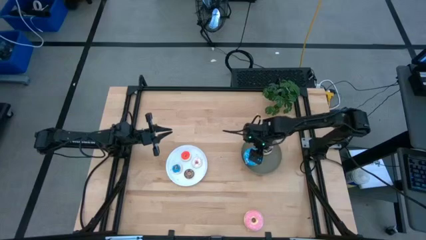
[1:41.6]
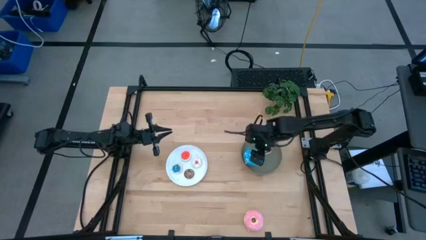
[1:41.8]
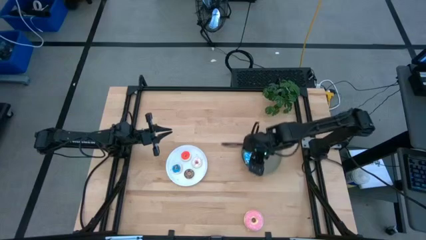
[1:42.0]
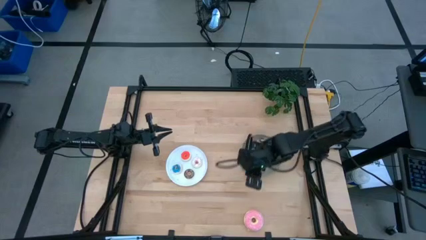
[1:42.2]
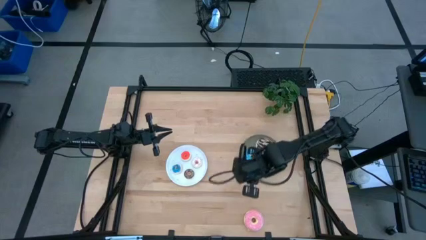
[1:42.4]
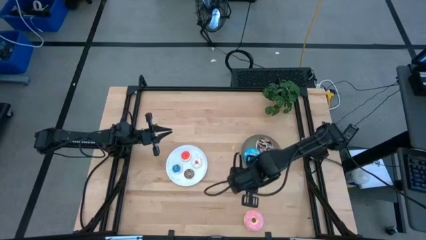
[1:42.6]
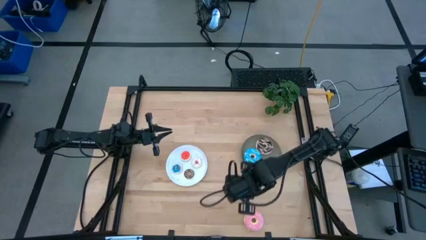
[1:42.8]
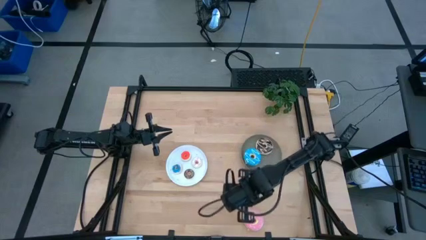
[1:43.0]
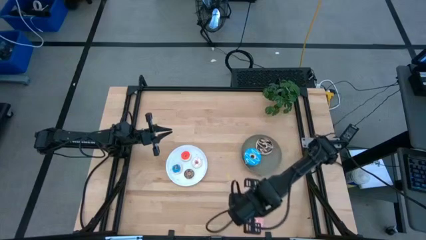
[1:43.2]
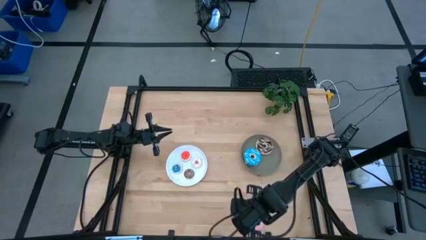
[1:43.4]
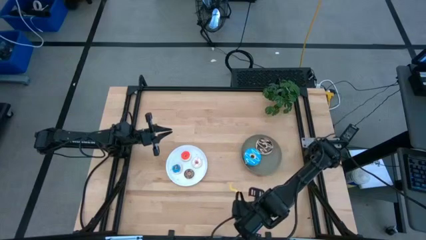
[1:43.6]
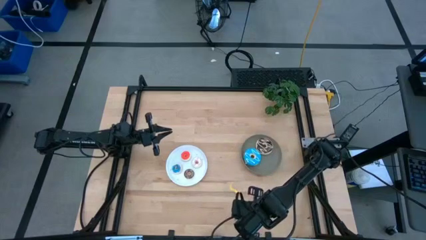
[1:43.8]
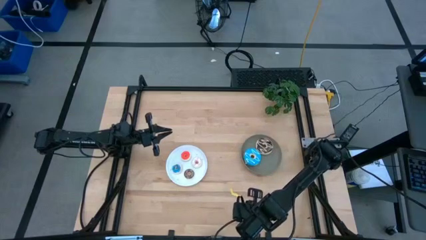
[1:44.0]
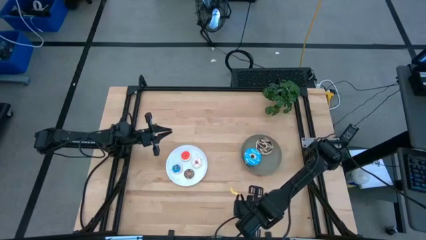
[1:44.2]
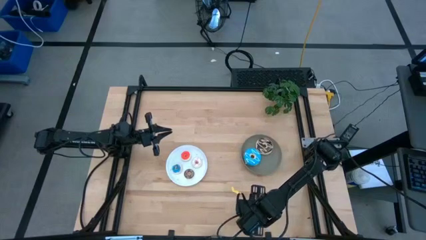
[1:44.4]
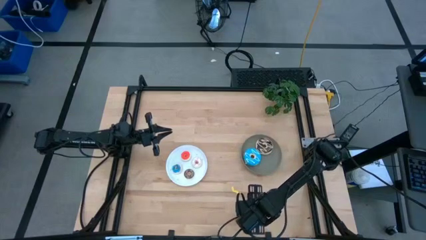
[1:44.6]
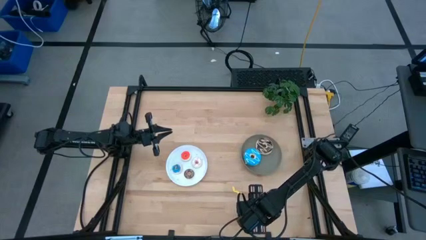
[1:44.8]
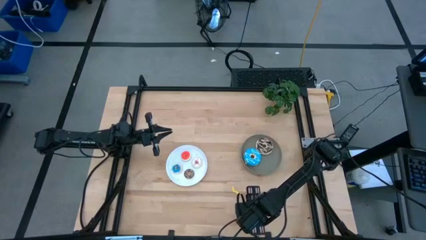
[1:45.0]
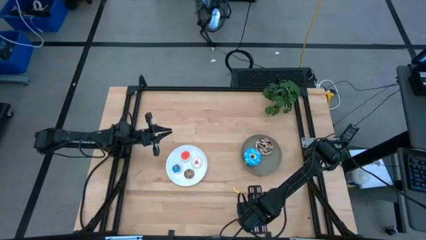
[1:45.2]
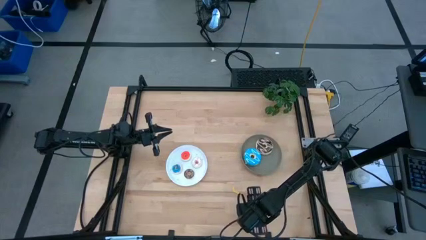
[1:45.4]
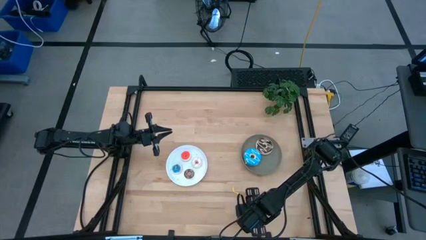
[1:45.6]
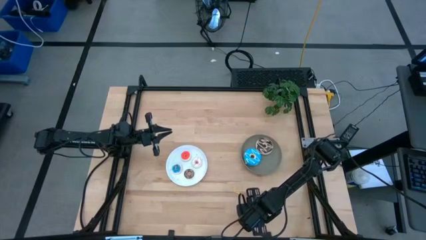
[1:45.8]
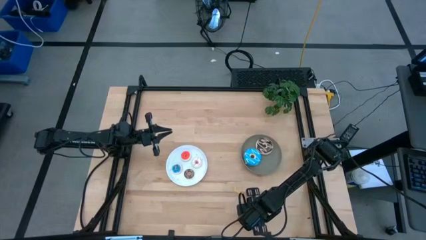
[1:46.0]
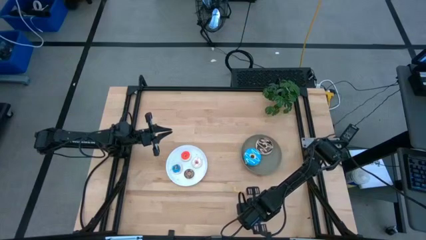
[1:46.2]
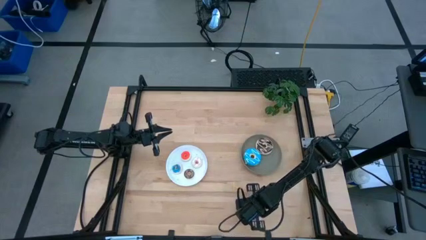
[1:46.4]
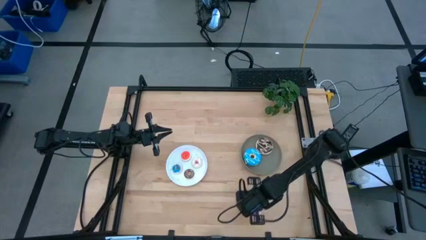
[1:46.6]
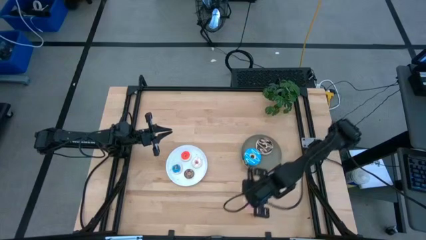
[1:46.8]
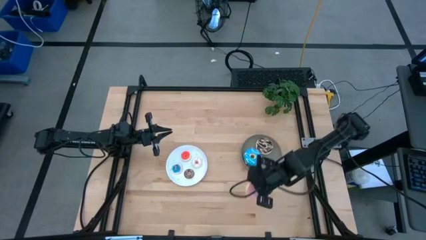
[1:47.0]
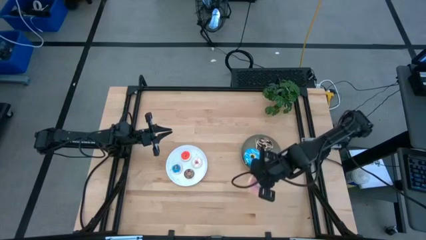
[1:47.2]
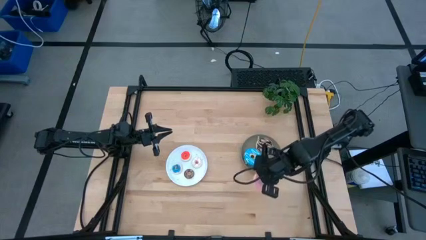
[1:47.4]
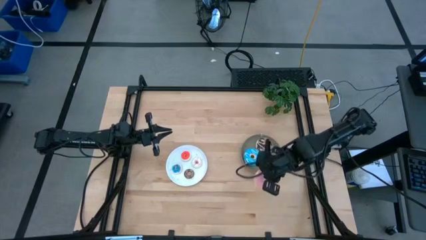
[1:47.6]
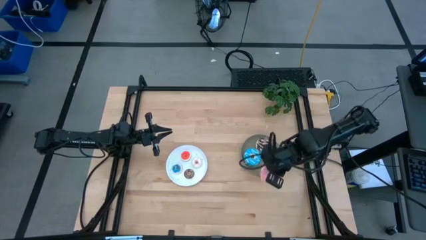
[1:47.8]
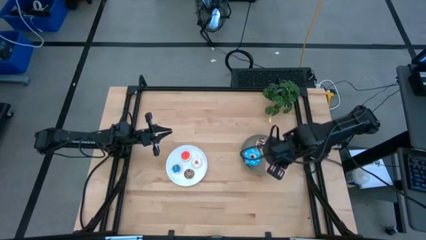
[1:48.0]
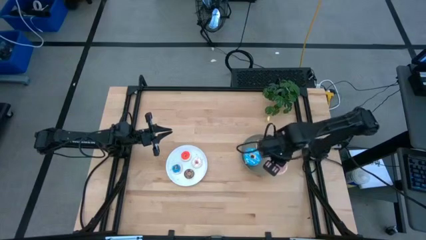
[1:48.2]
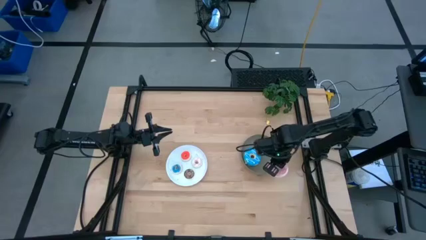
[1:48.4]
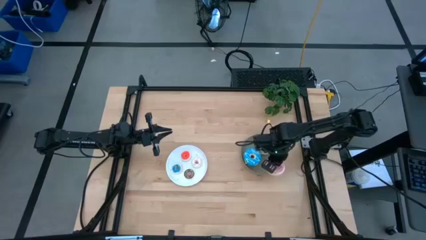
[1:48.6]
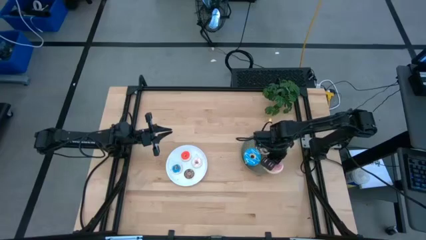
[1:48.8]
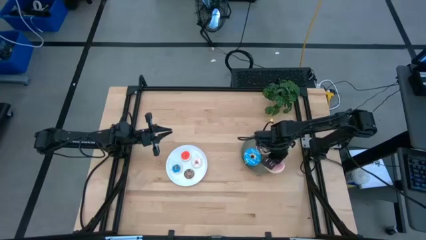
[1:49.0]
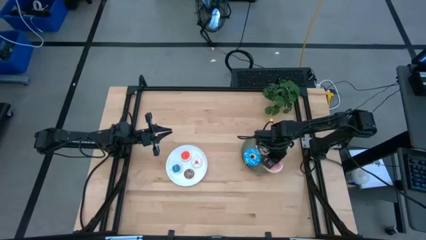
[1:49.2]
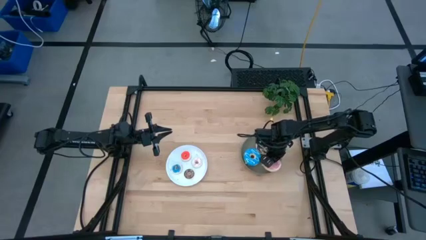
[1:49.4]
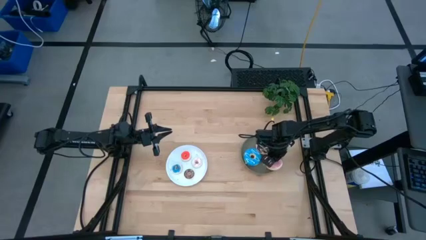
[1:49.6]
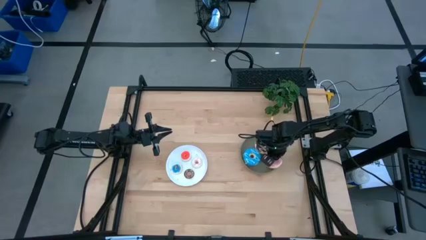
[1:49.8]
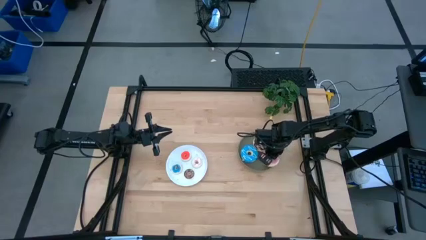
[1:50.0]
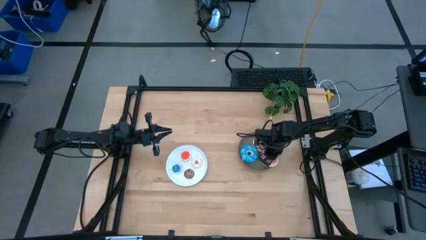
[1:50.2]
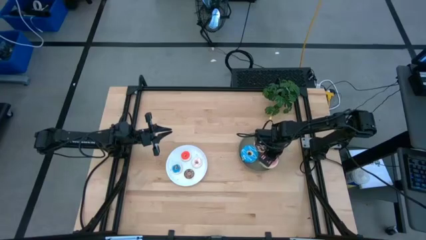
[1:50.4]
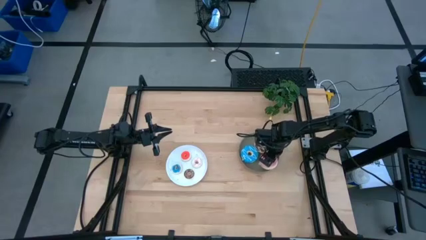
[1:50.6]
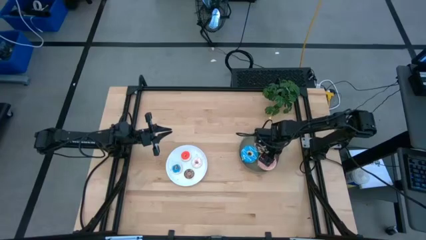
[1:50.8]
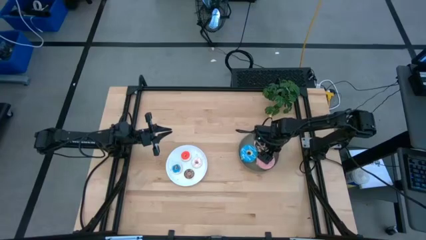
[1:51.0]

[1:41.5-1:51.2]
Task: Pick & Place donuts
Put the large pink donut on the gray plate

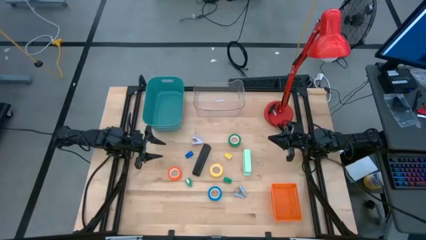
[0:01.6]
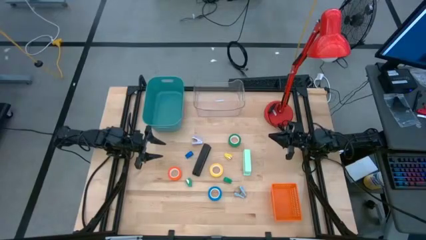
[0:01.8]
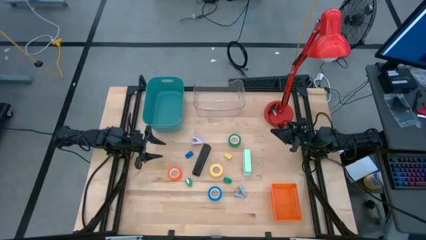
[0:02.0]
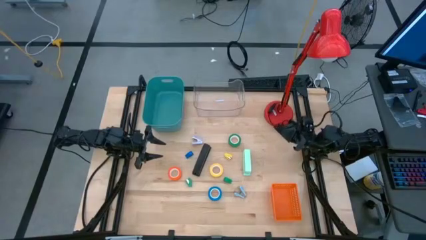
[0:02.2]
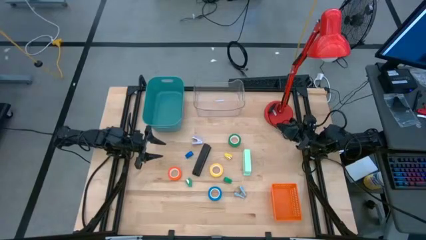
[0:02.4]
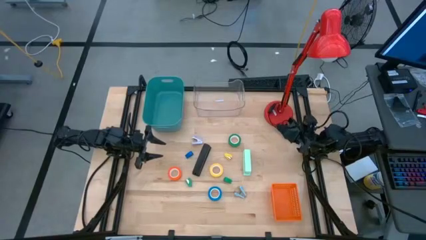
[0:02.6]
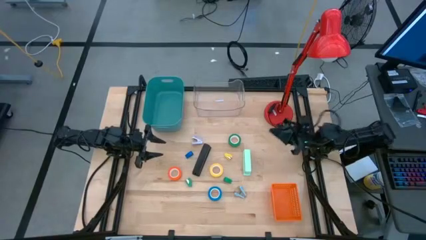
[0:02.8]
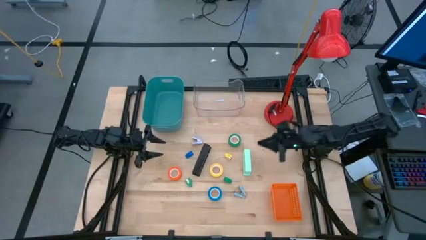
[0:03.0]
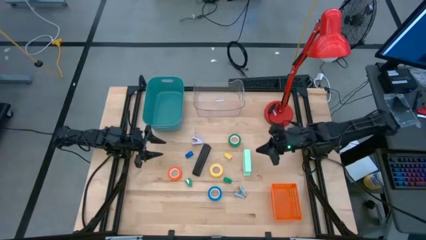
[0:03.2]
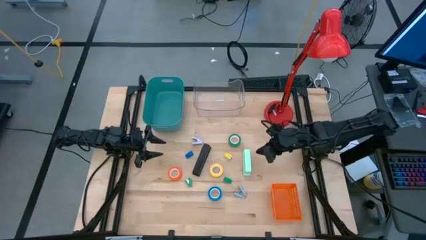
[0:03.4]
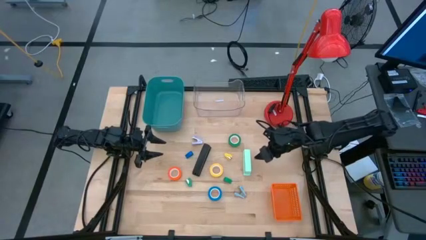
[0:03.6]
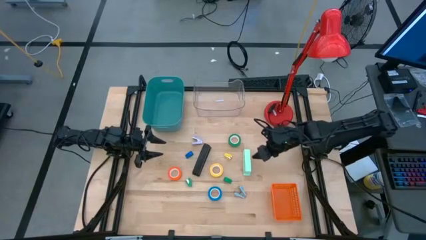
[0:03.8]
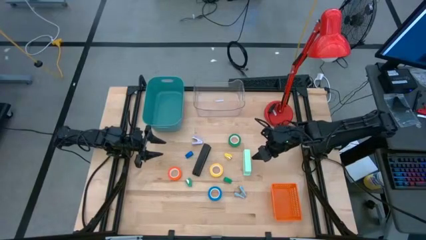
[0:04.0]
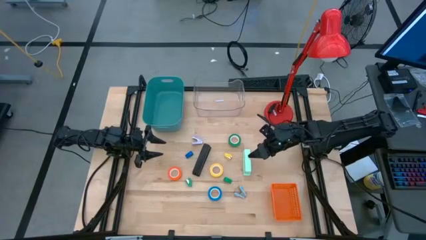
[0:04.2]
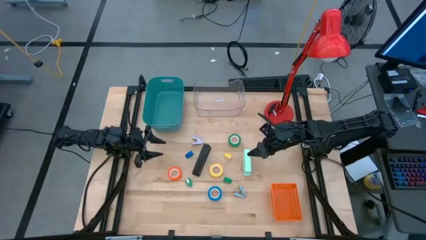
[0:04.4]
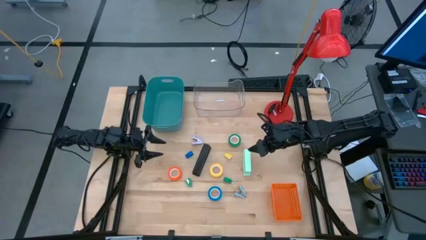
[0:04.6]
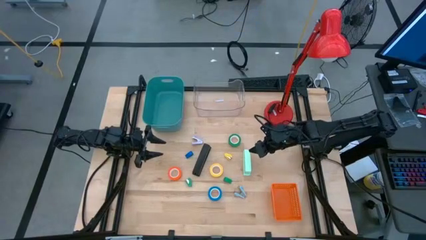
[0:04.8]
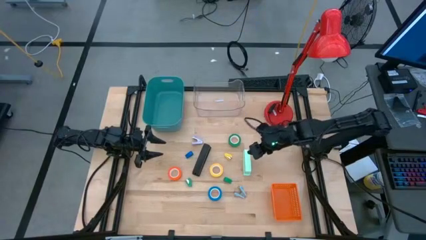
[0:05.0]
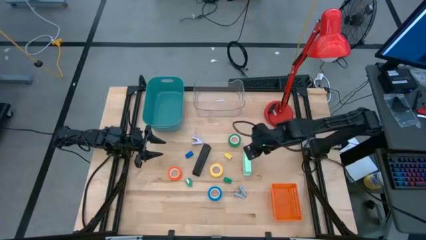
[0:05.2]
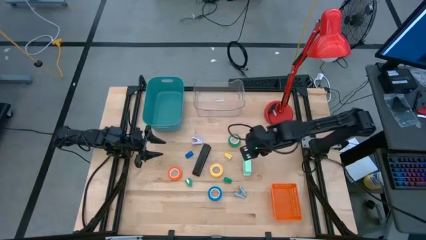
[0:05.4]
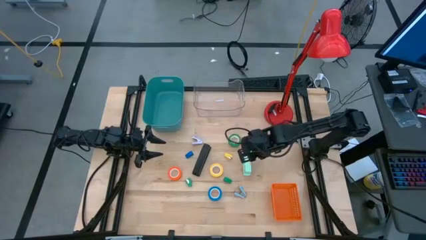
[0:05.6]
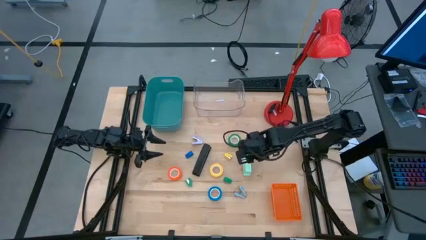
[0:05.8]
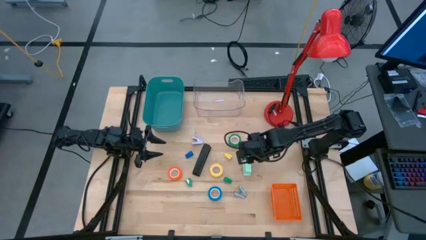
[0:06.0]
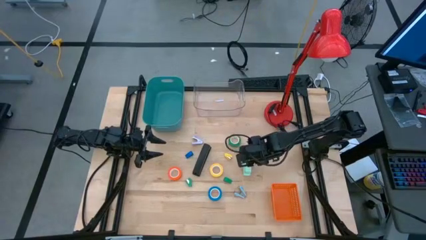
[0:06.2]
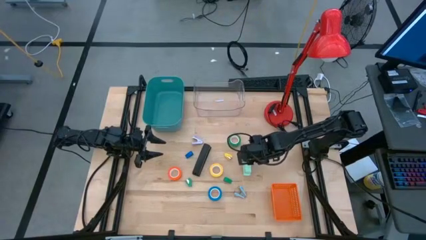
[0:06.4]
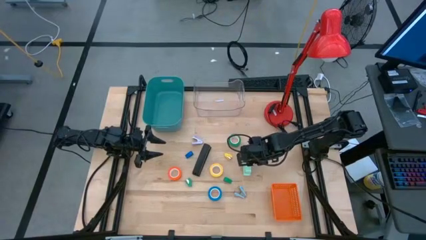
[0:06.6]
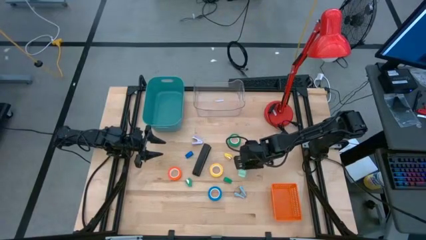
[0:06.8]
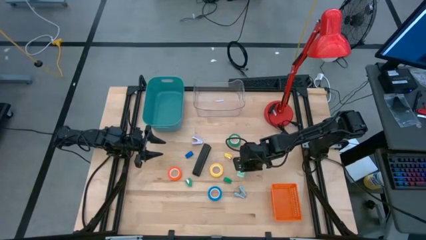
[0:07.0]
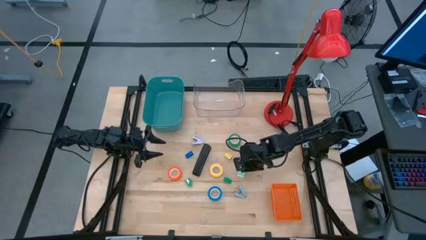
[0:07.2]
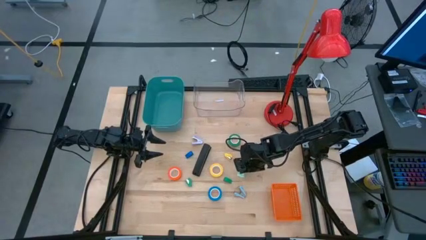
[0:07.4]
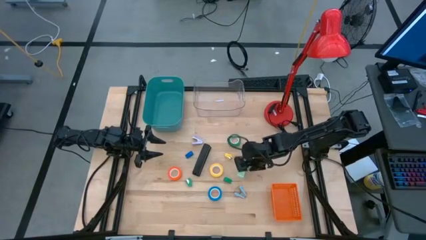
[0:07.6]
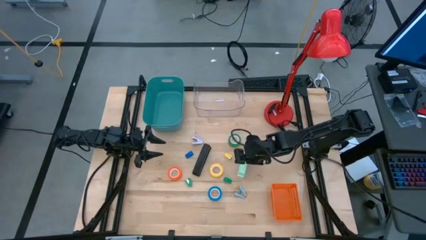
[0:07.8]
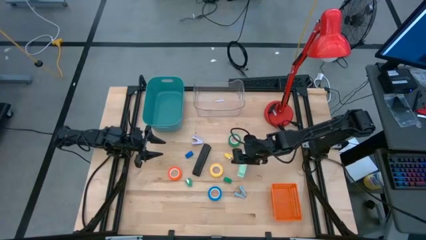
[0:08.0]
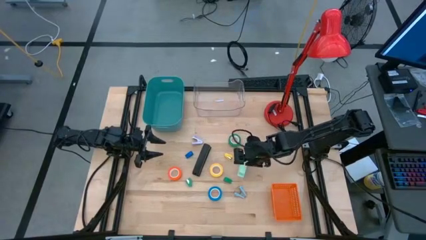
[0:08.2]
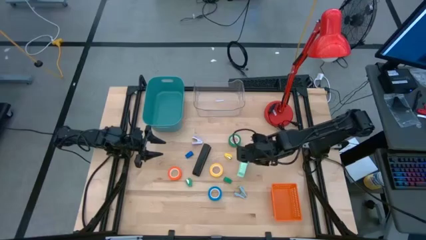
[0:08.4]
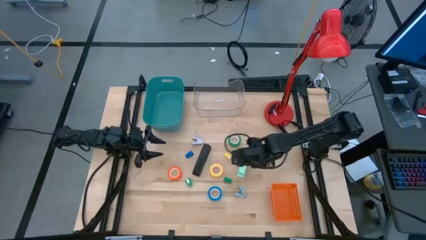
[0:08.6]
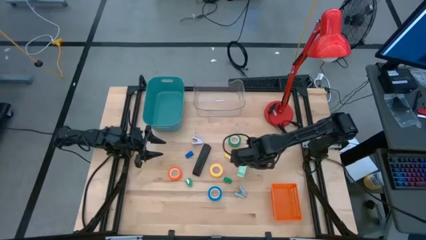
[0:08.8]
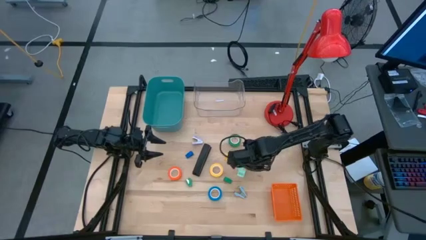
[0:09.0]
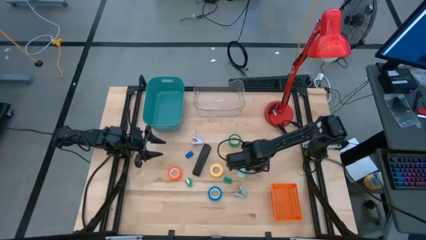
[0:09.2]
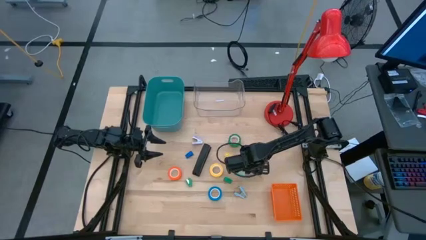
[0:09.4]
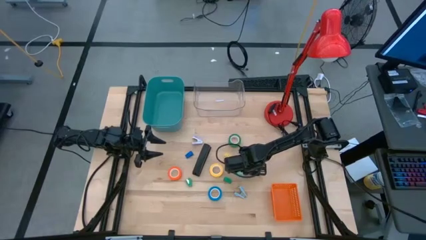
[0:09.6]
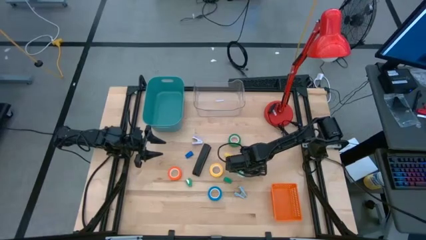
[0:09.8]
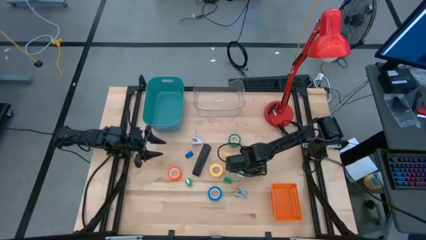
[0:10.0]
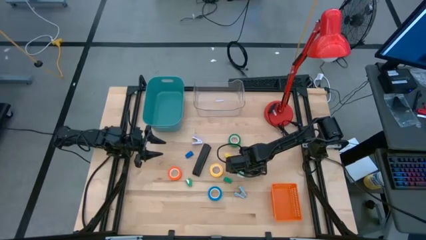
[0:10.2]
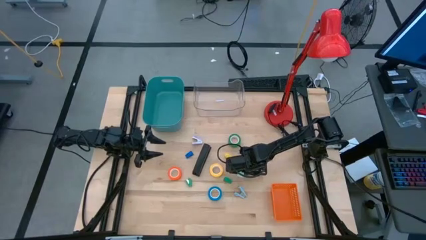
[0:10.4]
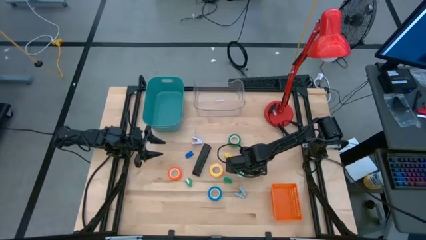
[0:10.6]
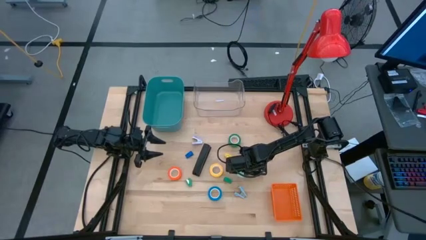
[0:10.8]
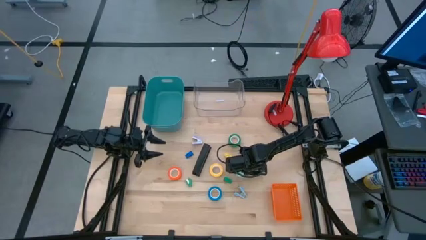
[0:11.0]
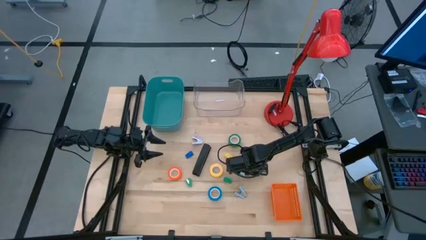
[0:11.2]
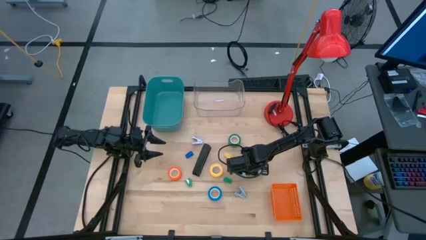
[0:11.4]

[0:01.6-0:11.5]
Task: Pick and place Stapler, Stapler remover, tape
Put the large light green stapler into the green bin
